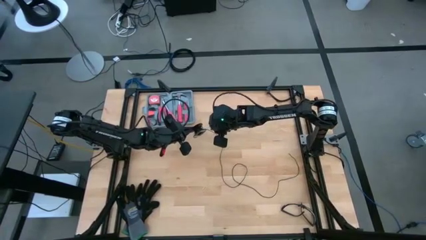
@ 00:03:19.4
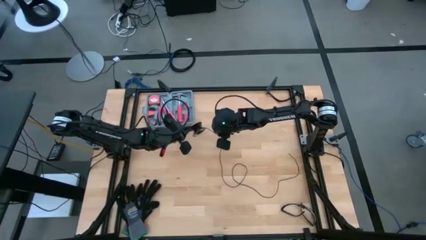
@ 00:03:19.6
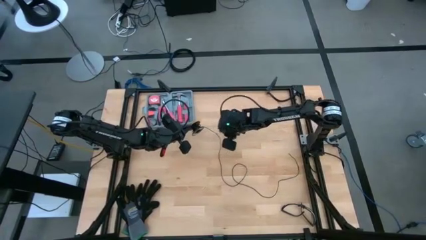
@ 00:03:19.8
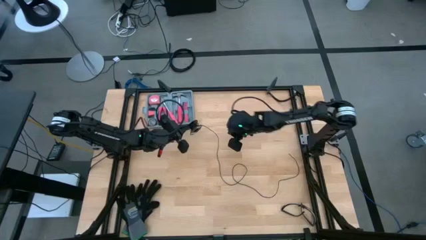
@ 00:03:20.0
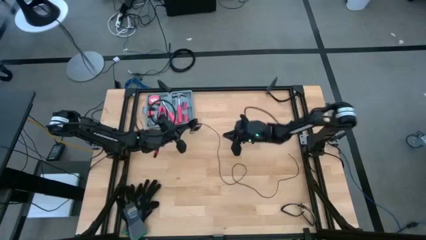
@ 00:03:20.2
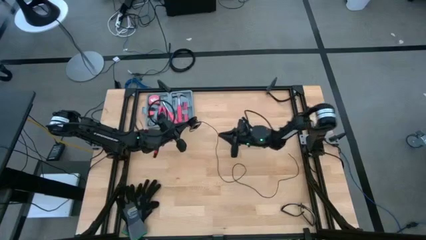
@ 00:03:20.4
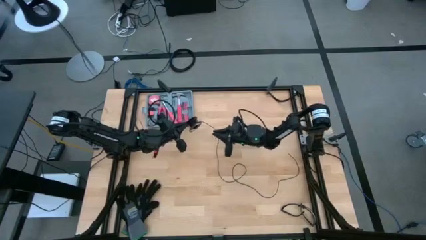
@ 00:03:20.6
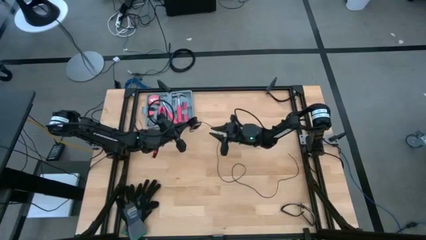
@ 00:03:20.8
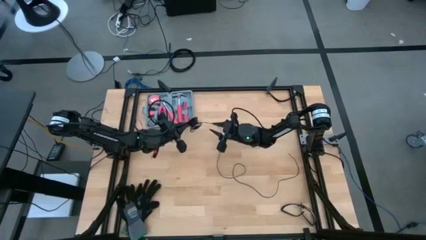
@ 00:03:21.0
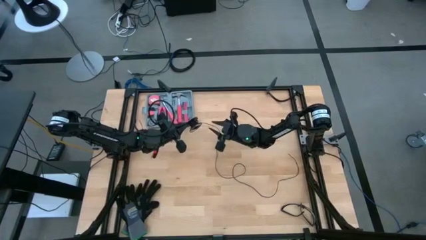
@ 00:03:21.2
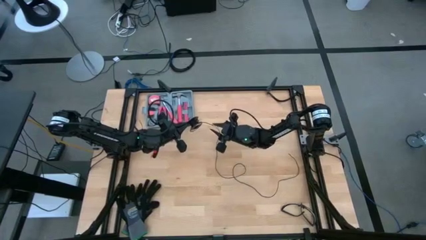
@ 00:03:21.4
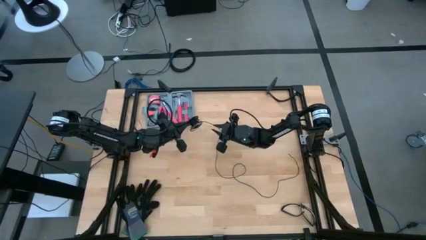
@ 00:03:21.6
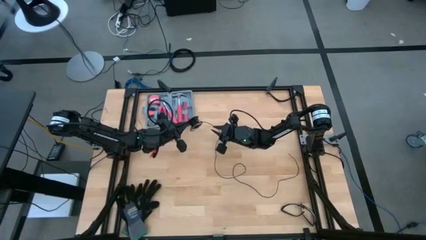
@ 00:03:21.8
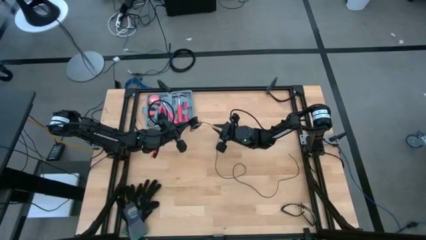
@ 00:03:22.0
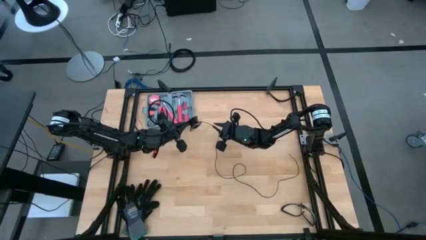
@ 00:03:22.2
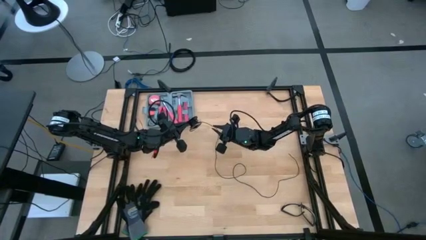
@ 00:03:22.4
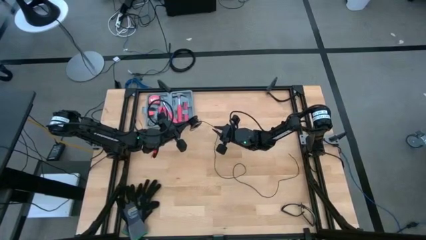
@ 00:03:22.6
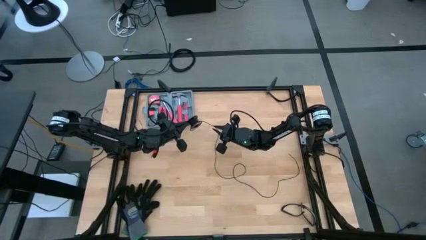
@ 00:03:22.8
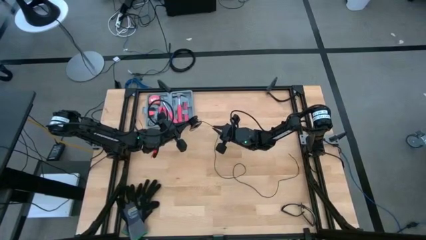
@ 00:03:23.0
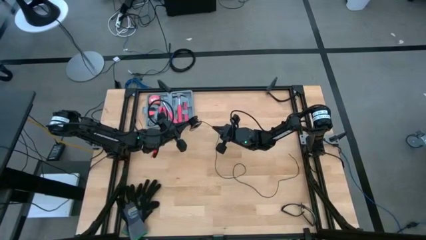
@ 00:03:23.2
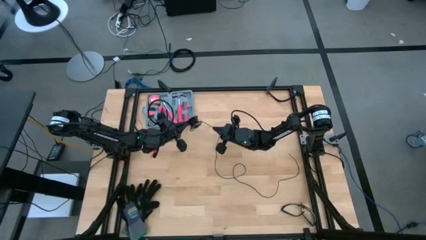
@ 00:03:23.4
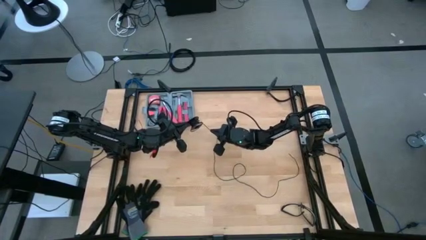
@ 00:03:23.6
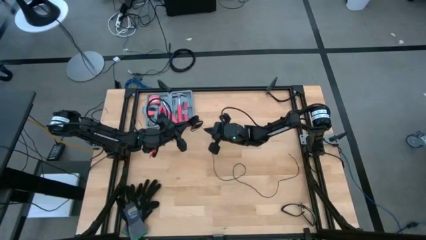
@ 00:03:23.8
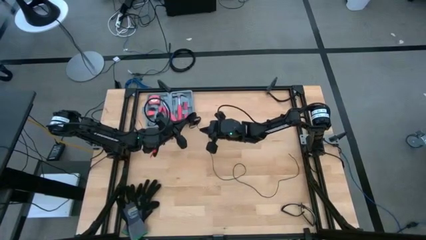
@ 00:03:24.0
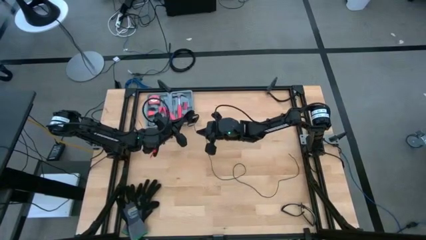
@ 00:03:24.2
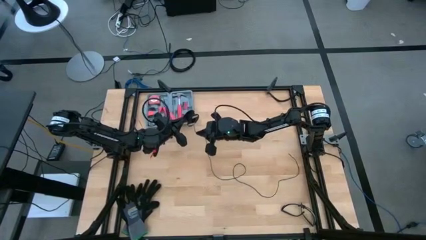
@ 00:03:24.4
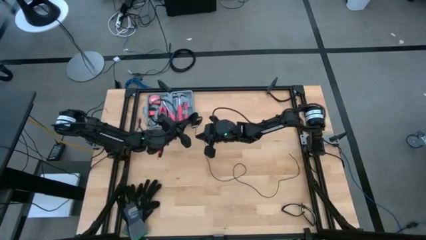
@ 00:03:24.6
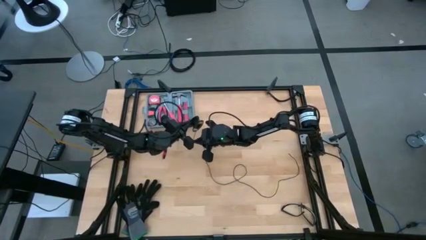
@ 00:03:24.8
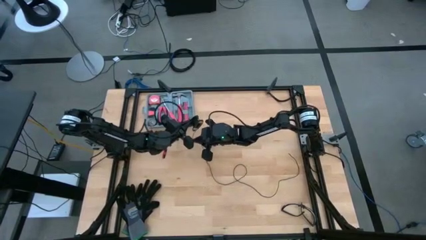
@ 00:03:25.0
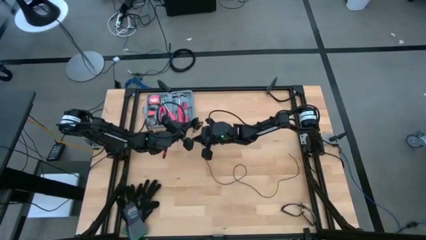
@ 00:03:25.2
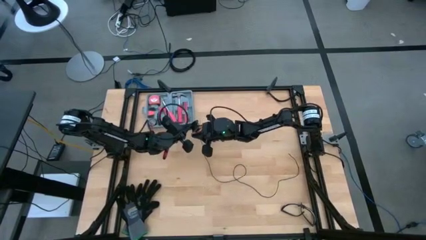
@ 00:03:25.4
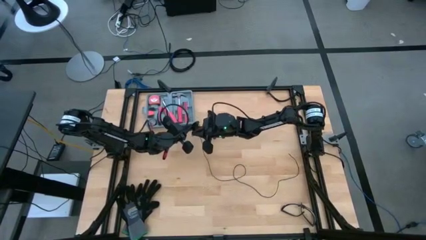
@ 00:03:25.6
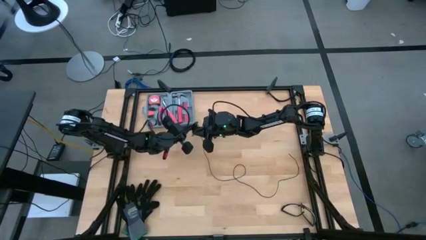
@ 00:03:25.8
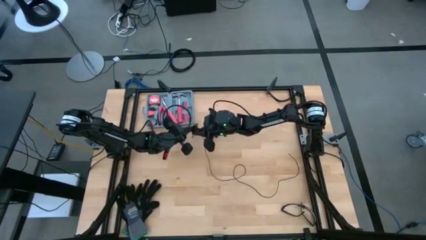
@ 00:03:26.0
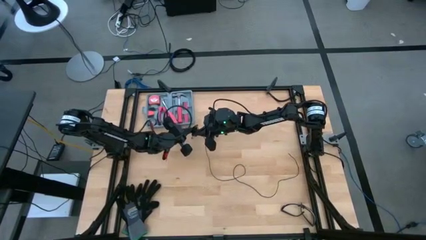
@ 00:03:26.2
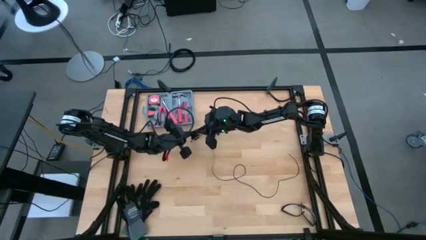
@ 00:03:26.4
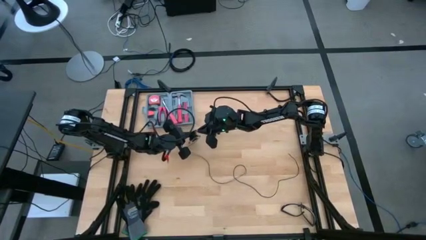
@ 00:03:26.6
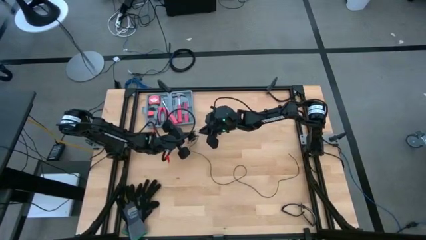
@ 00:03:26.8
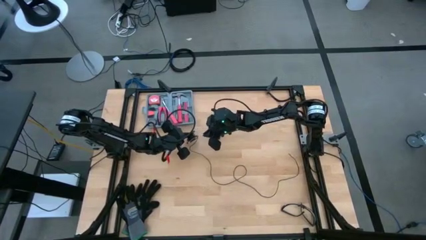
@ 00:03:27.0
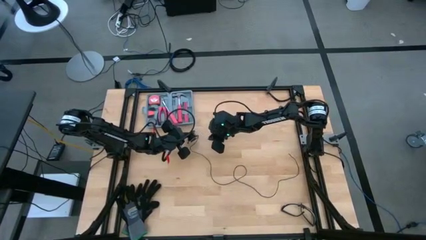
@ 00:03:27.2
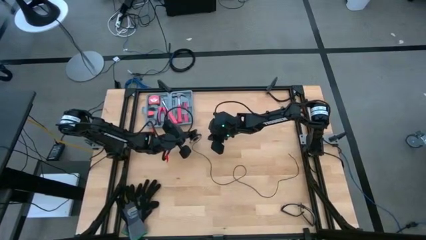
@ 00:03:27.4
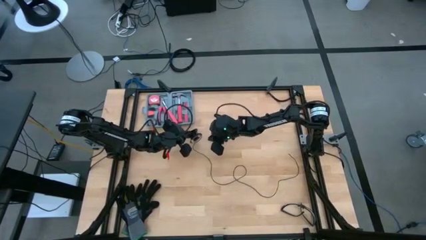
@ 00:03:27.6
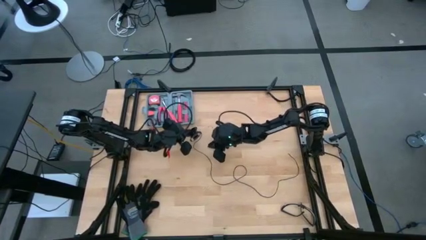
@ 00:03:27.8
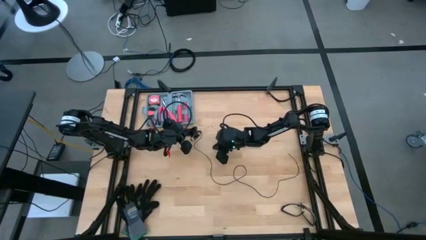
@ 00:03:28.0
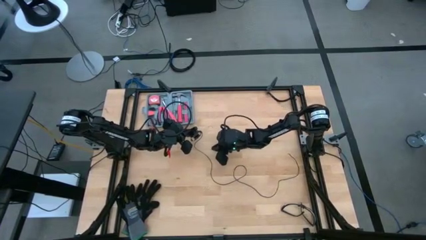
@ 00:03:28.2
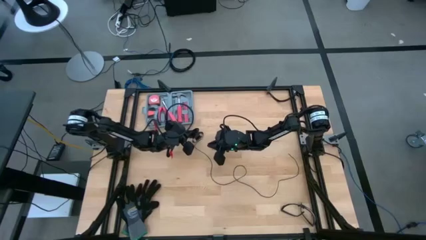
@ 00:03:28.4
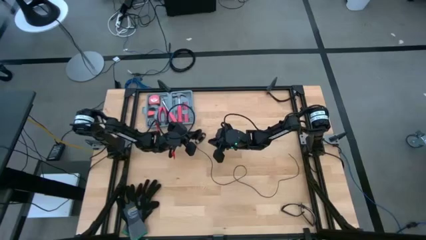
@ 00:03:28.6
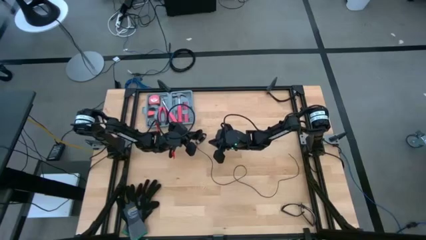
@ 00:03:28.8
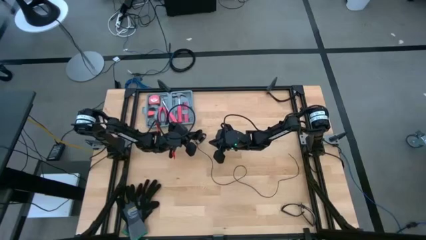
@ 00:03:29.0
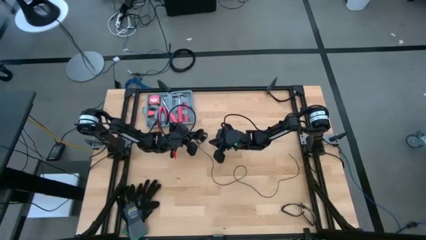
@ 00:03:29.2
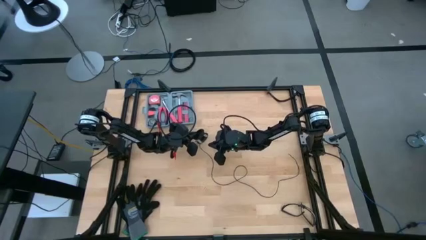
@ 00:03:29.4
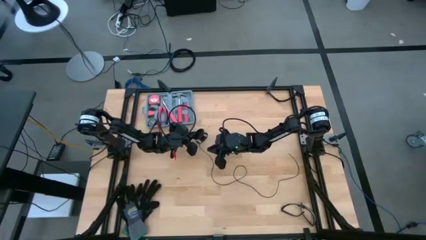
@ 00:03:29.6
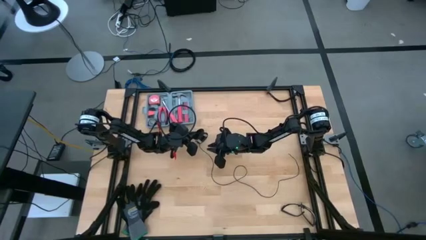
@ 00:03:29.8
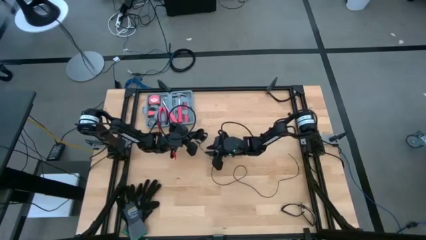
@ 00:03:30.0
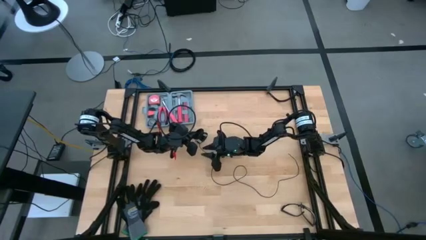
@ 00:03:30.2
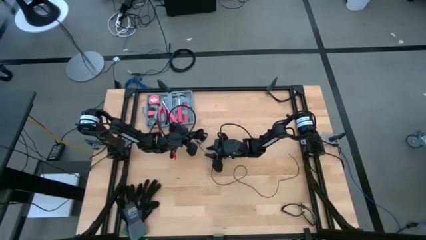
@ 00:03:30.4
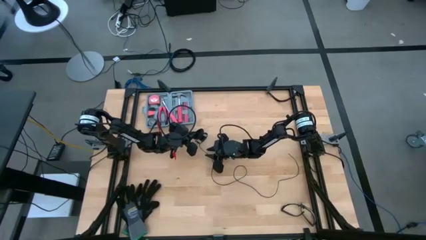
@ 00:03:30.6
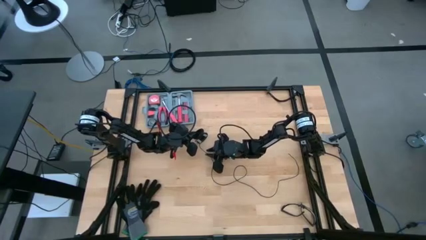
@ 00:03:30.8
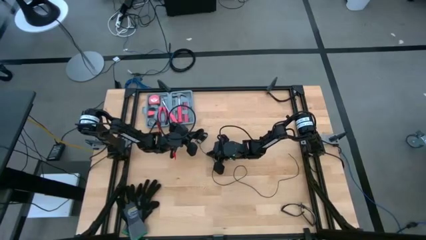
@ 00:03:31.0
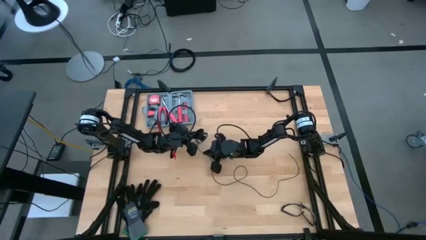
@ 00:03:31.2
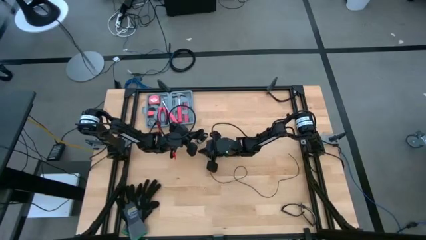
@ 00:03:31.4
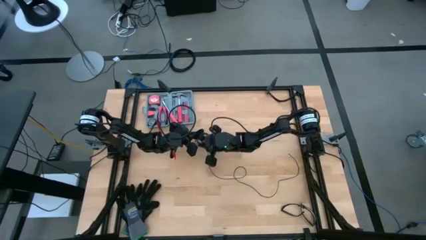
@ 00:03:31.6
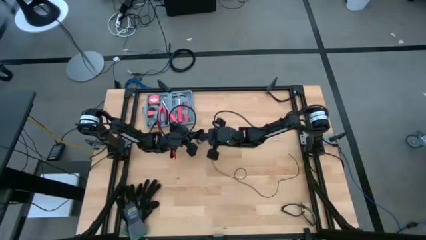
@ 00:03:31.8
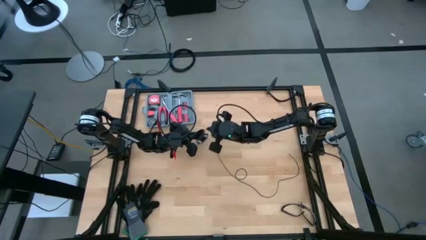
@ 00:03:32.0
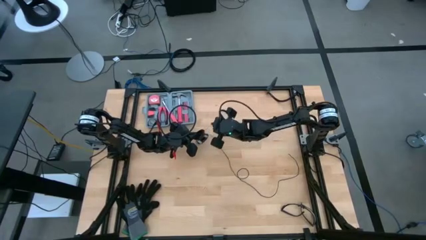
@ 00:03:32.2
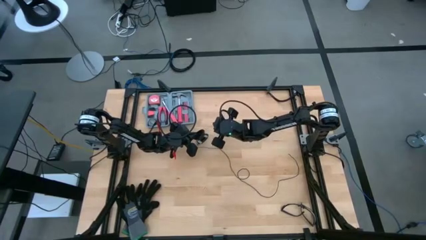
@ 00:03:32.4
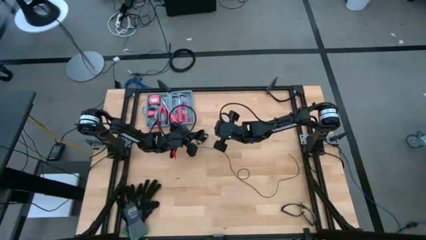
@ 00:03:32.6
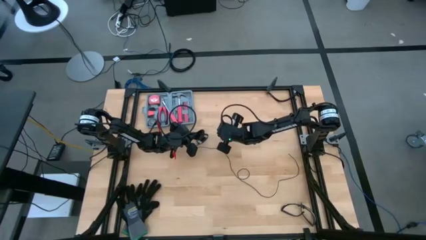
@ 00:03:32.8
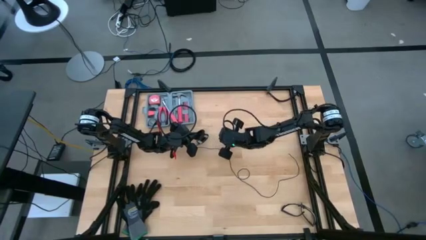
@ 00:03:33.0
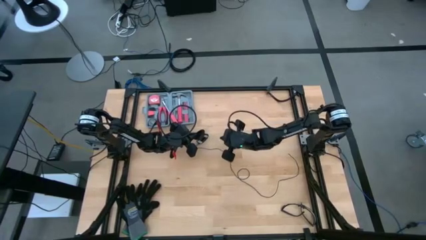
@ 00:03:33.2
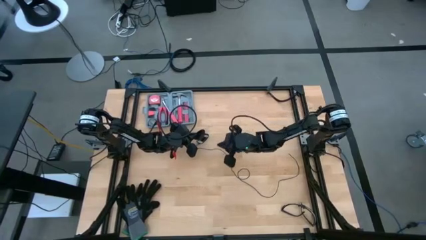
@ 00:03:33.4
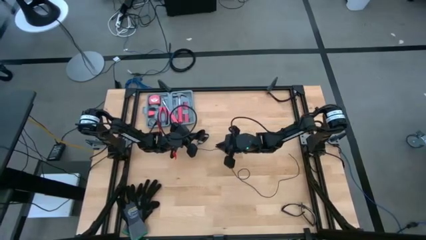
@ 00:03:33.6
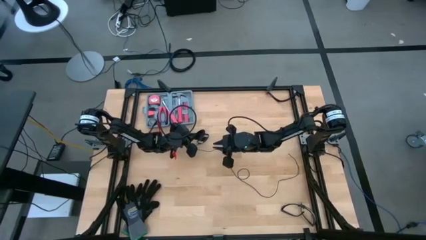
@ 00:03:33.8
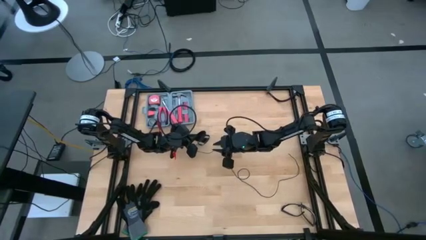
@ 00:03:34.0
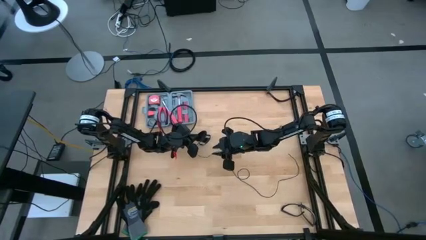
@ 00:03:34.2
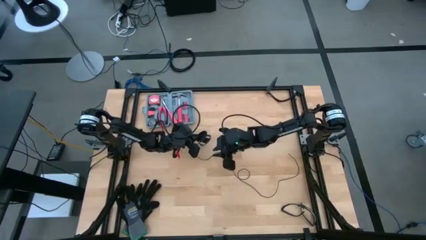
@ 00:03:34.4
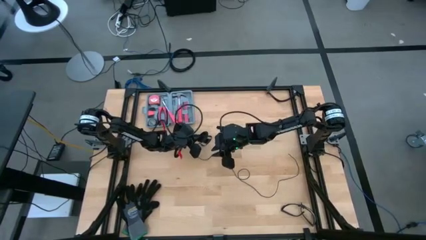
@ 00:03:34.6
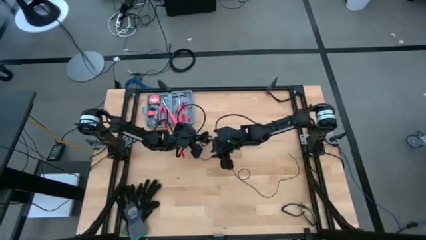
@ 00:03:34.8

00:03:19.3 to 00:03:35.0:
Task: Coil cords
Coil the black wire onto the spool

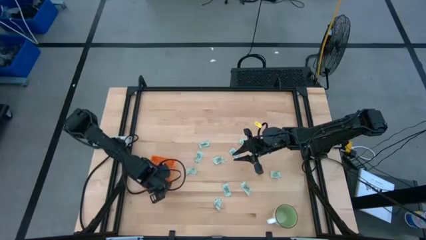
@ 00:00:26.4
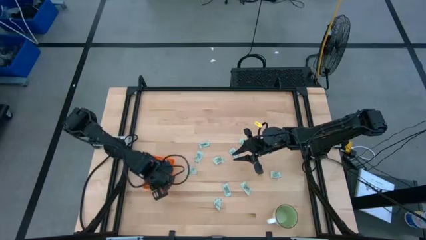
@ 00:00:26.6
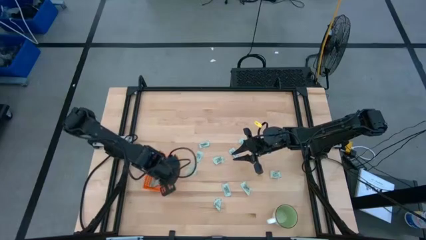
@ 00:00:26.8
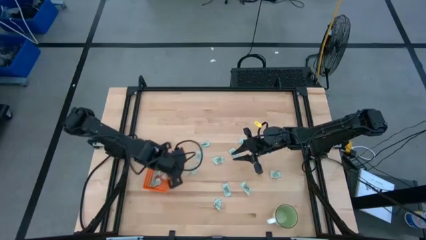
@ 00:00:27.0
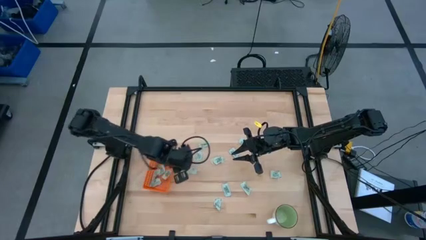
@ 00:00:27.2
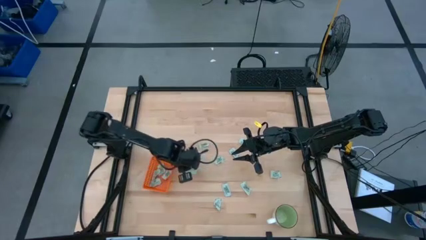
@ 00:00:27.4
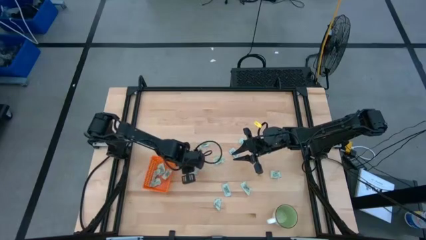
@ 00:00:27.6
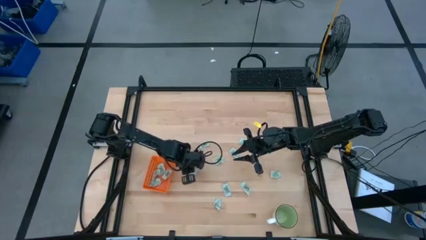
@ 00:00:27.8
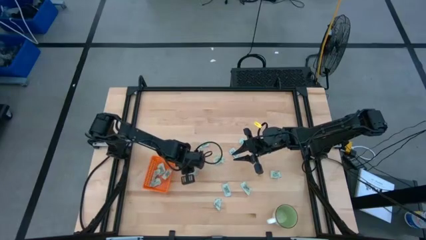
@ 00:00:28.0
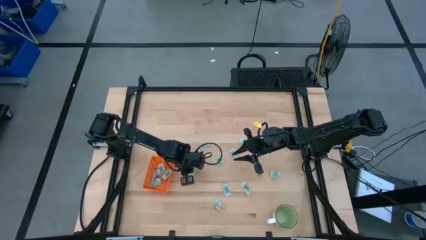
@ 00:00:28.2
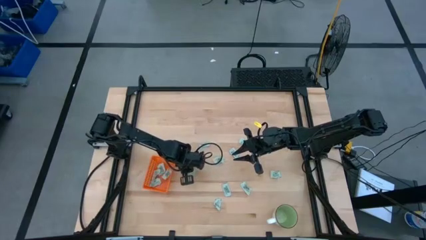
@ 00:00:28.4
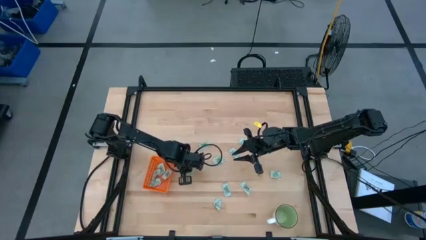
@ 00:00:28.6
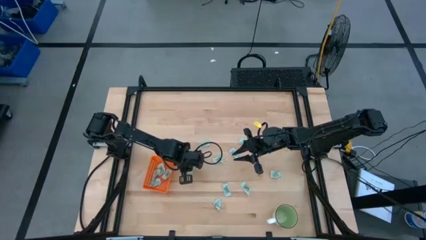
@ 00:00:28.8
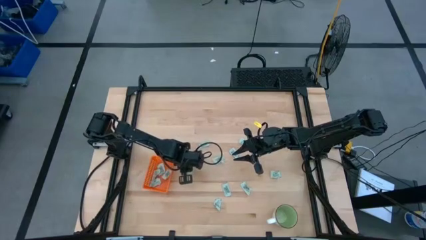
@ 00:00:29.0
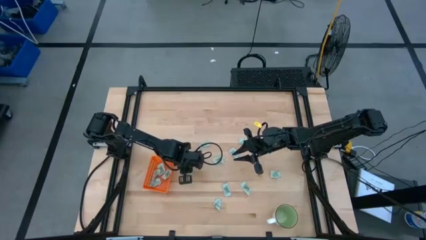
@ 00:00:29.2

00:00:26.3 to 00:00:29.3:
Task: Pick and place Stevia / Truvia into bins
Put the white stevia packet into the orange bin
